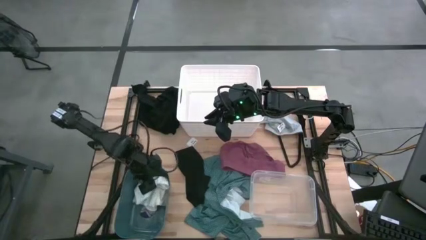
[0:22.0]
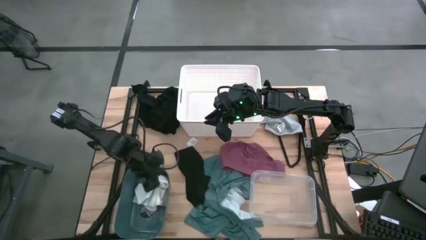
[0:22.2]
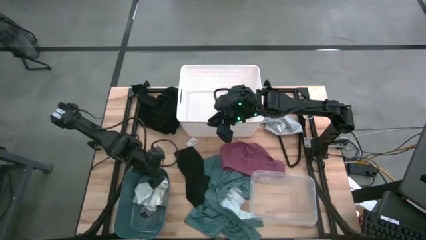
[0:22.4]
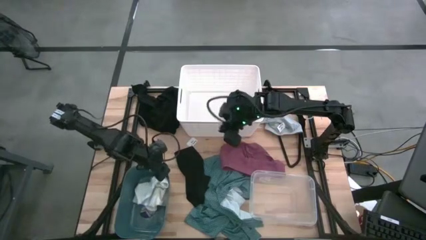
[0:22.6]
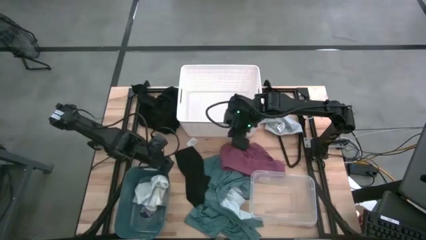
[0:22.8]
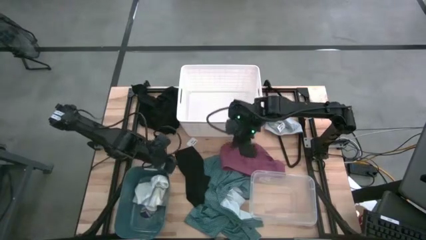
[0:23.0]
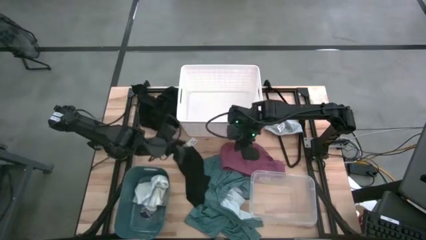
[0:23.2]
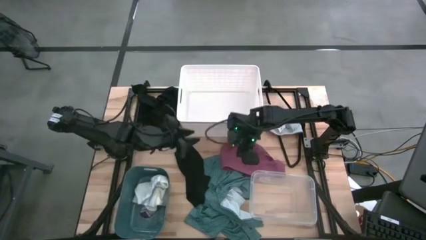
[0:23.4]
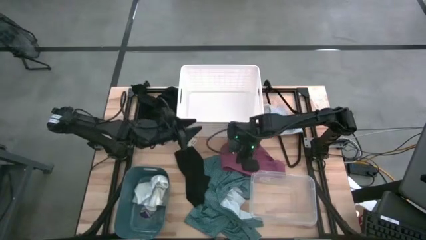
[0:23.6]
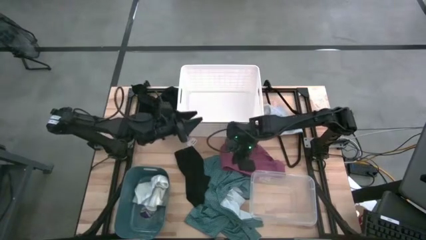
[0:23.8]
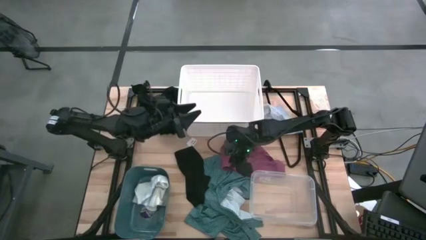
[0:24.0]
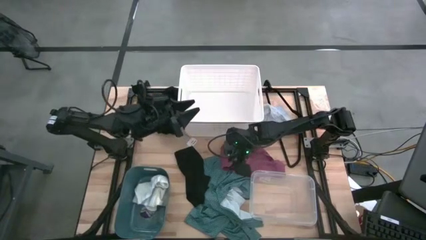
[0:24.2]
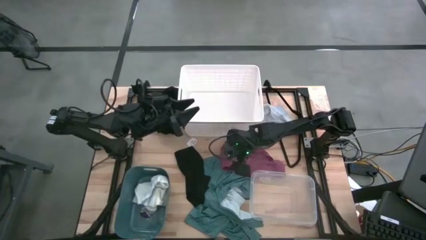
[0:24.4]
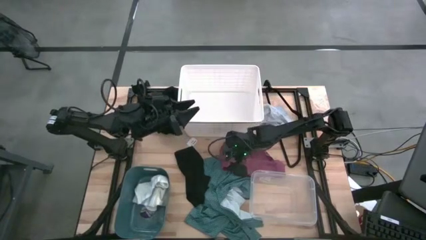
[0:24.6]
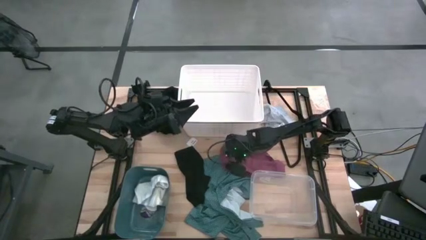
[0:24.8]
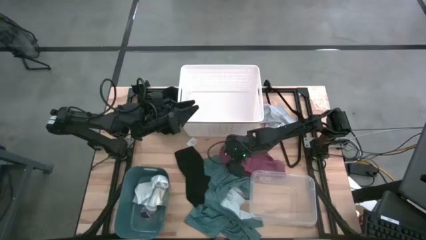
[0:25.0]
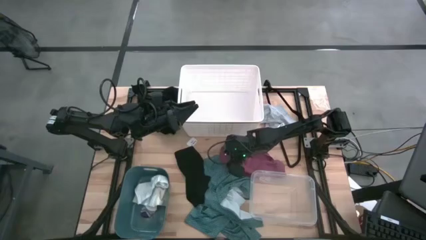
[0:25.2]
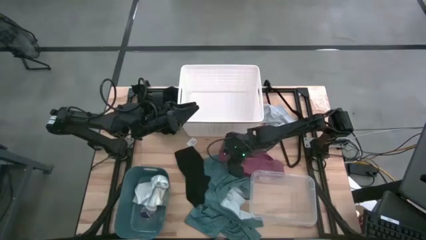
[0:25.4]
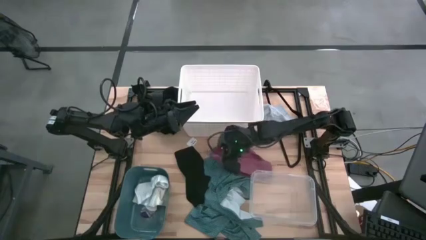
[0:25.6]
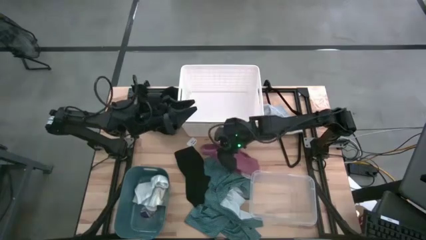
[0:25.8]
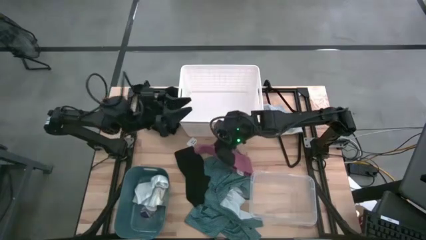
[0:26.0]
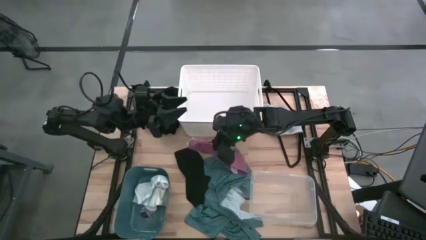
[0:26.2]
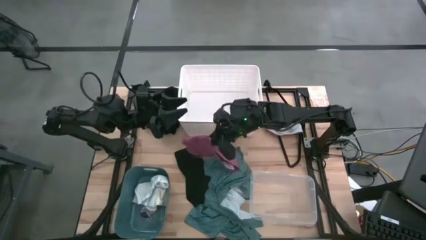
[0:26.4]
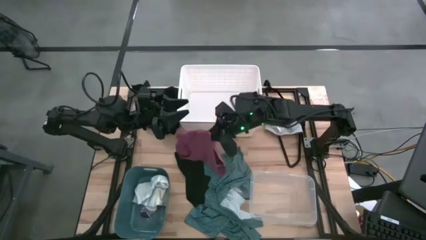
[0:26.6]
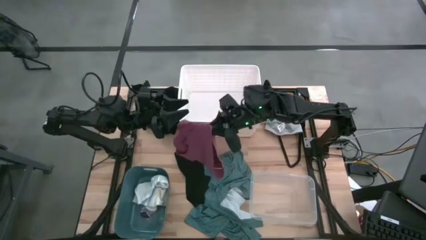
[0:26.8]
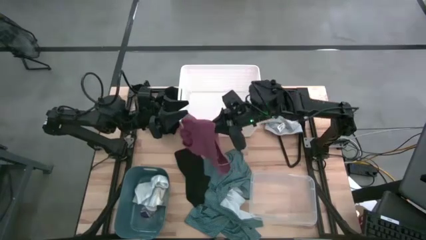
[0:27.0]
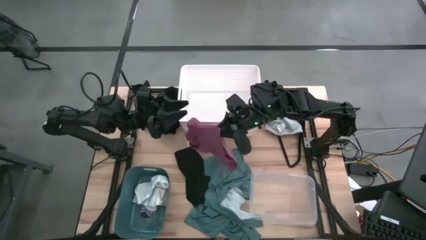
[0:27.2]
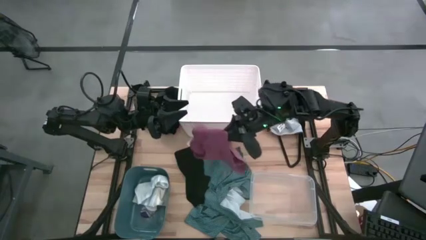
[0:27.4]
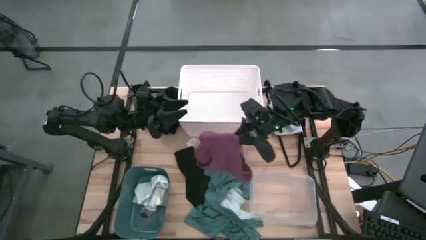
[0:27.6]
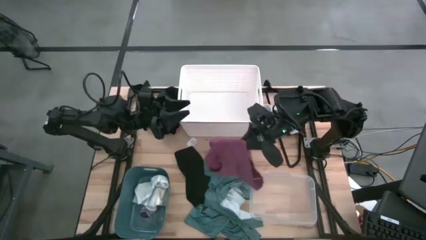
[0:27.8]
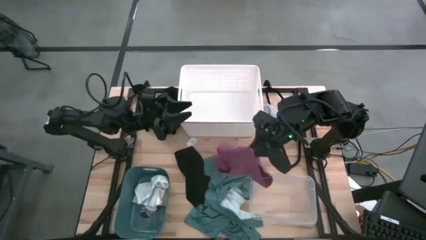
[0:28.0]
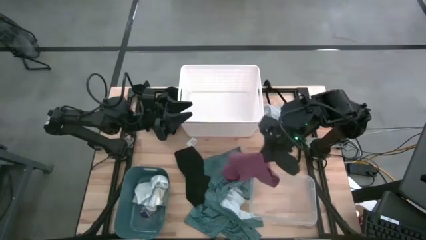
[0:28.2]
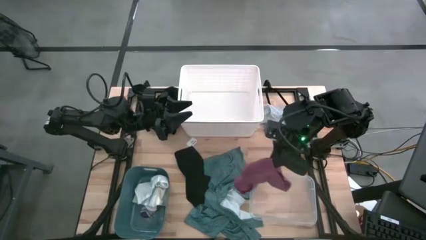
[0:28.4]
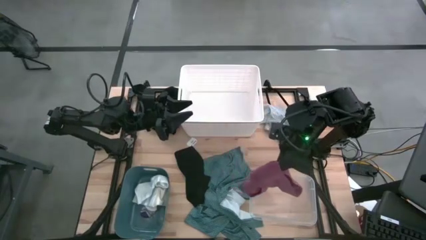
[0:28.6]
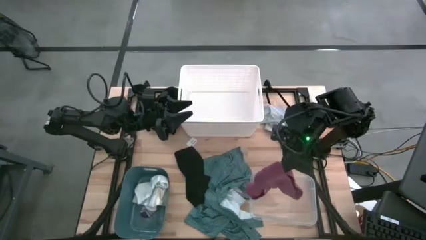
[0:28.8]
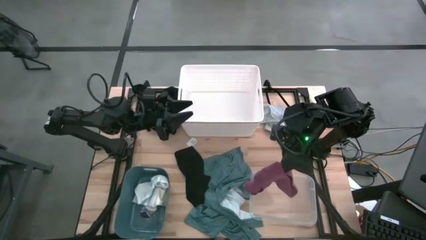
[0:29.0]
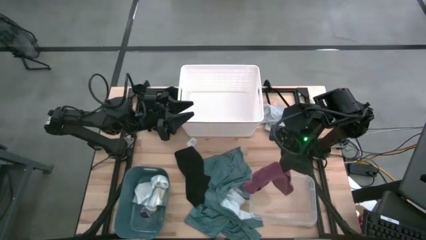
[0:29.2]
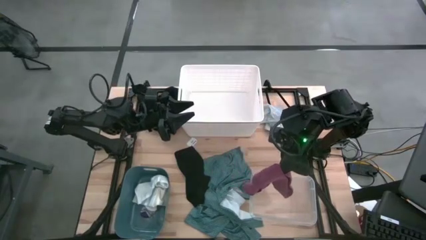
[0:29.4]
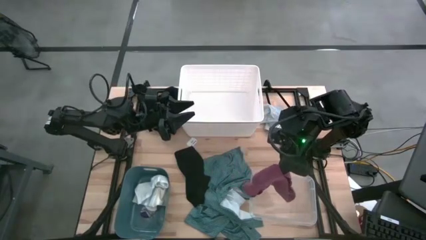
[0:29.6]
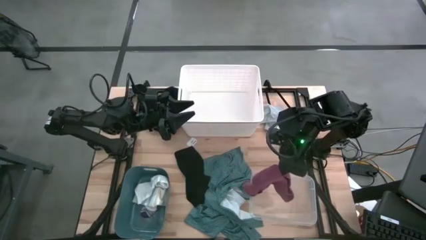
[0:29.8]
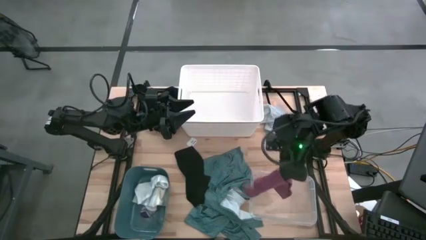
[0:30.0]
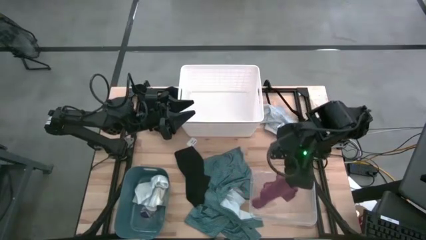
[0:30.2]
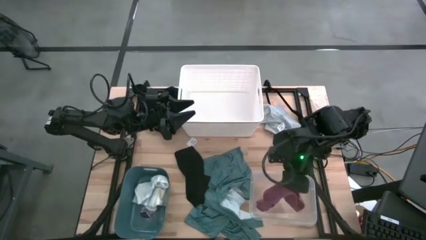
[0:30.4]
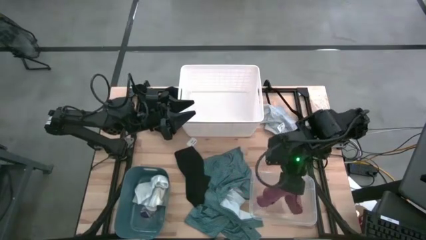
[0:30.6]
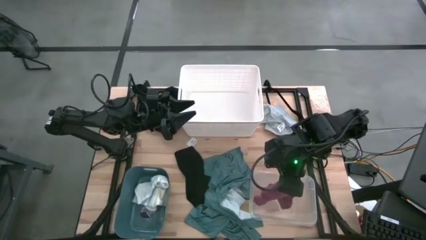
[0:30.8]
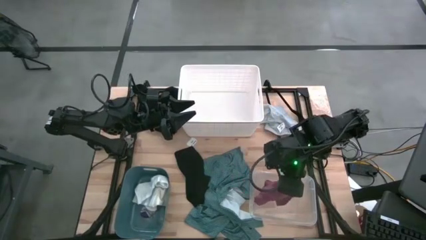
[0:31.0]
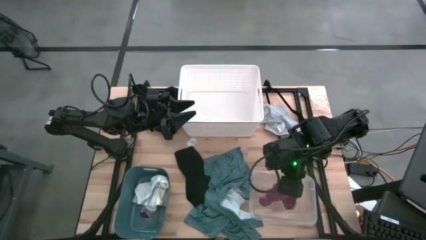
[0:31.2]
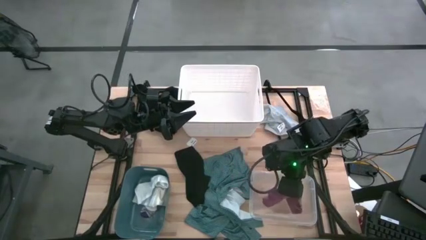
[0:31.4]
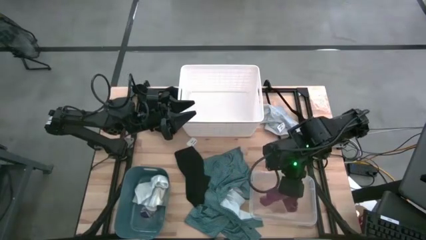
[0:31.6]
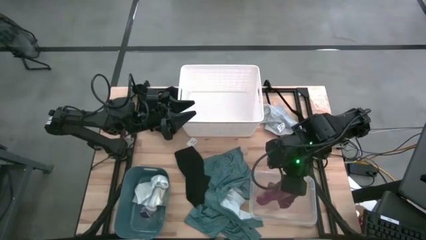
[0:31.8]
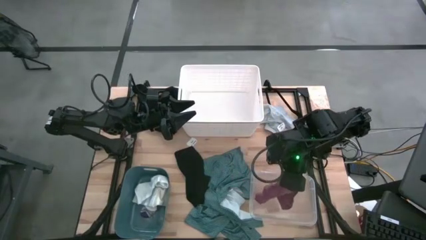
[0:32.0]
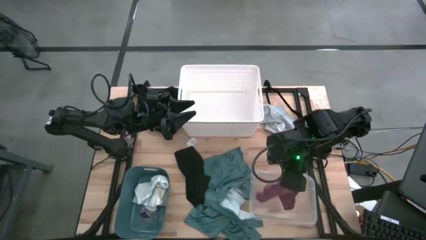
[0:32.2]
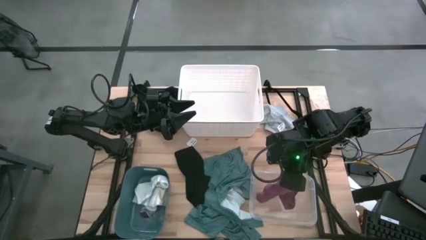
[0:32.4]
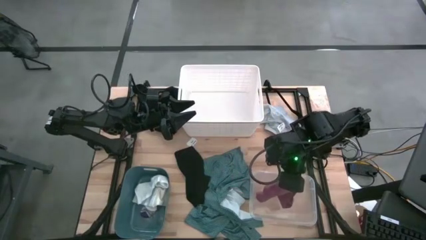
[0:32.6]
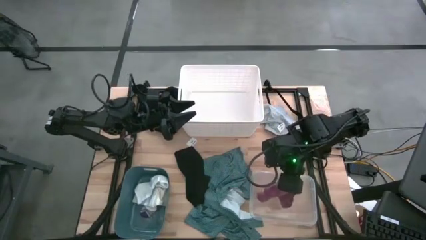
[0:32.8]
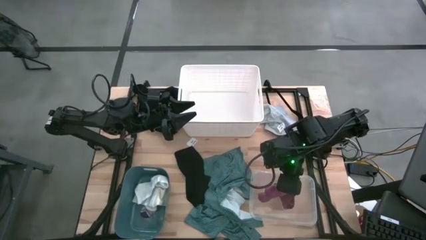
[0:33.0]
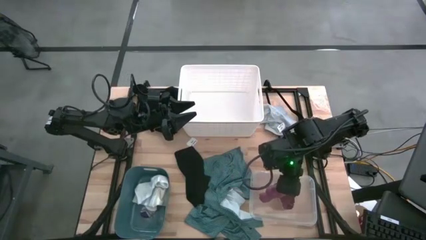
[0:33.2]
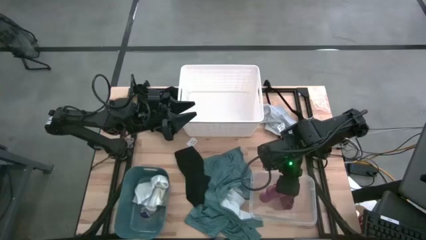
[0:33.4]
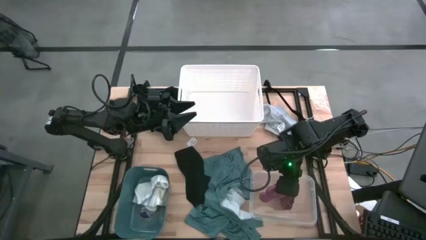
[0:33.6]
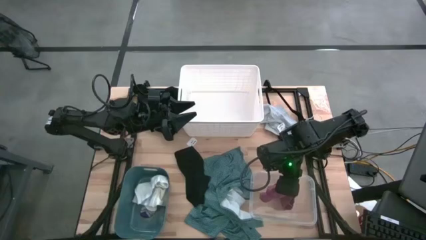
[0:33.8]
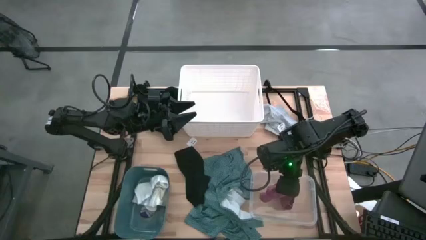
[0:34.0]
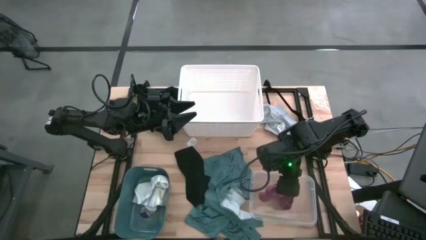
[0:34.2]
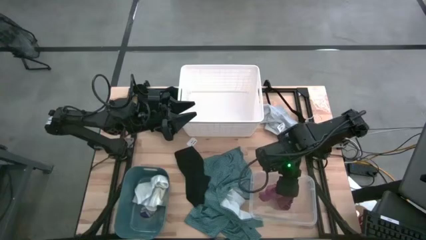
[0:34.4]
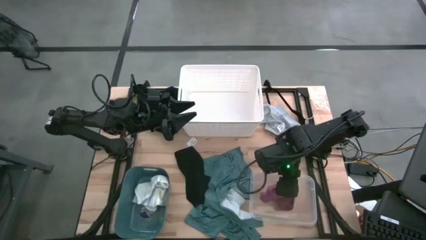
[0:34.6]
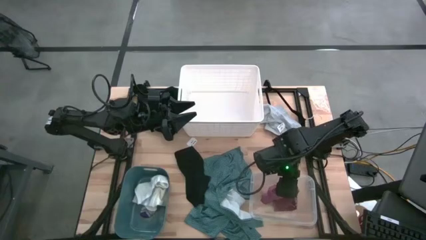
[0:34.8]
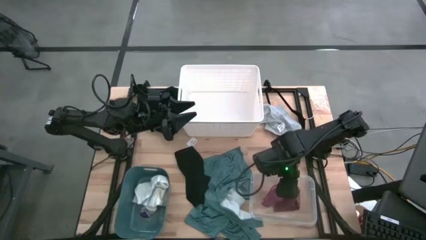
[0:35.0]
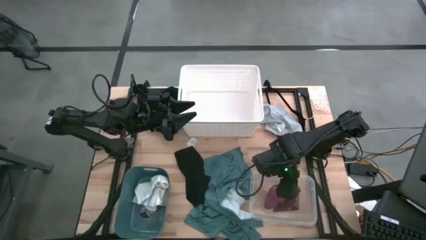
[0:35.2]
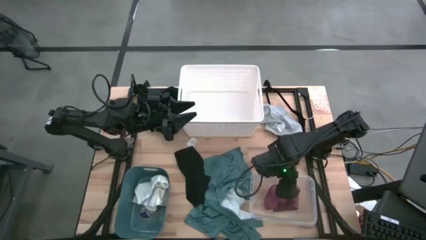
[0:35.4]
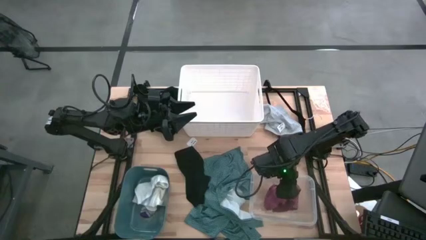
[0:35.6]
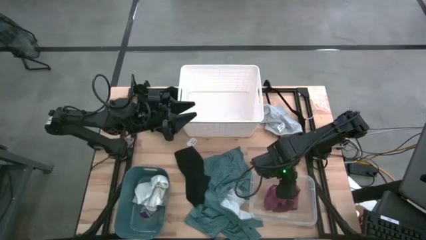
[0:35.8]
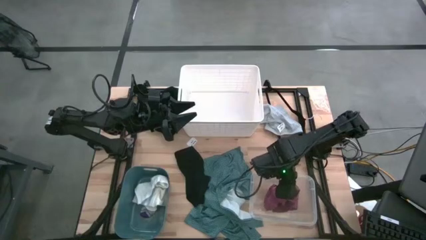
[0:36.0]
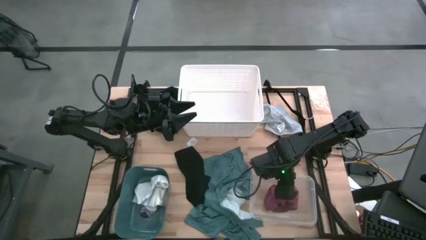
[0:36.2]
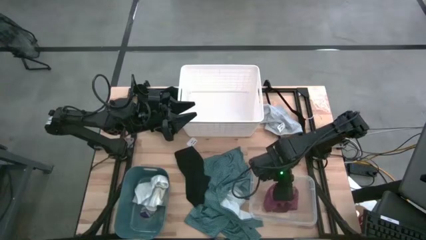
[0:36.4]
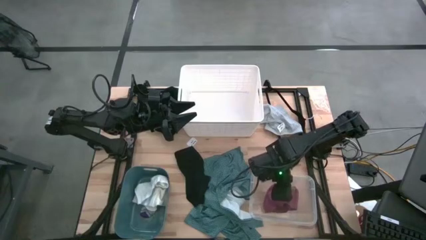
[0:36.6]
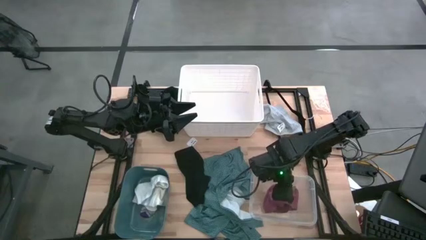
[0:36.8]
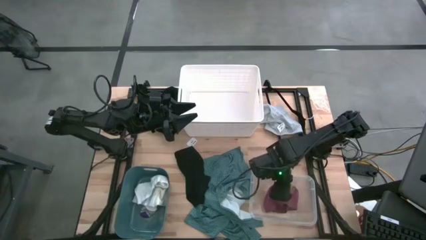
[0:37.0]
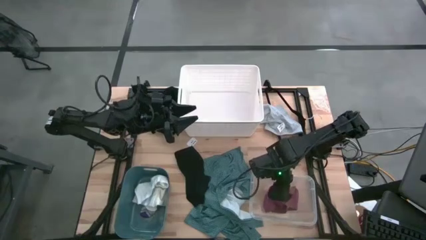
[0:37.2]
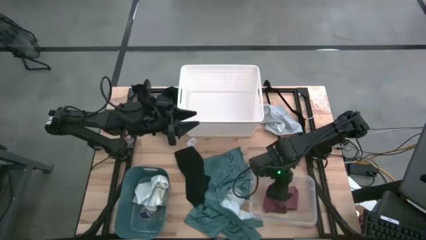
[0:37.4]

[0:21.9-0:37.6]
Task: Pick & Place Cloths
Put the red underwear into the transparent bin
